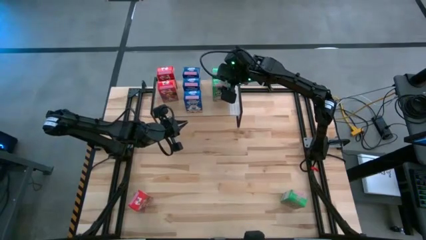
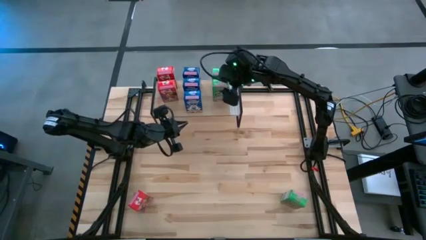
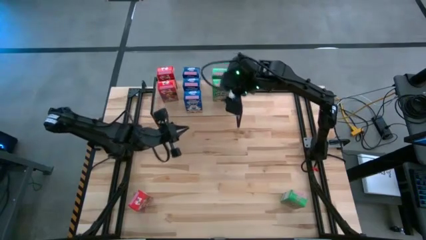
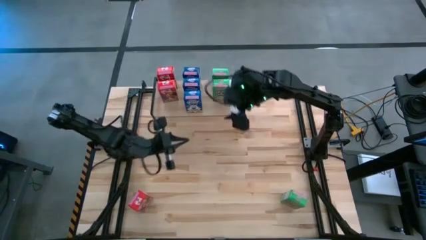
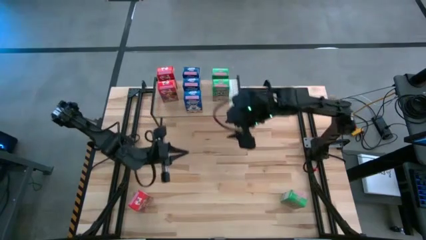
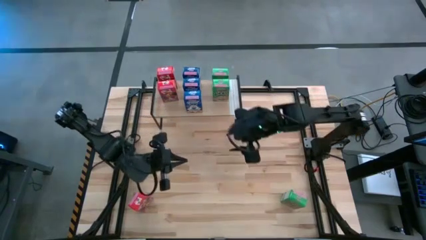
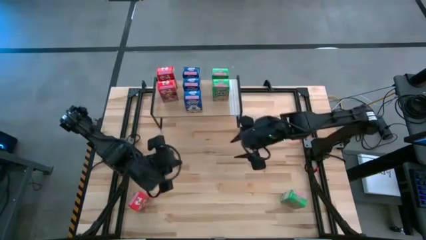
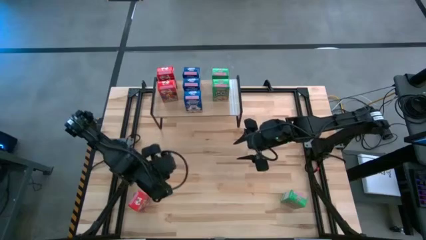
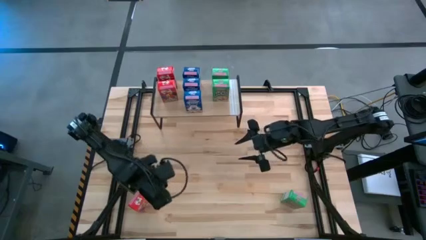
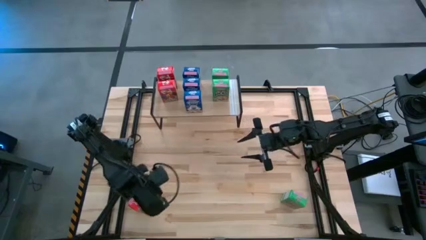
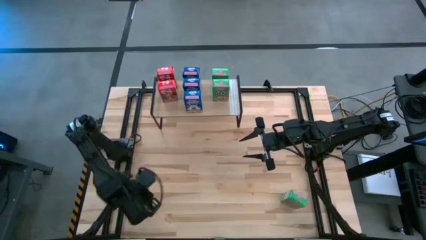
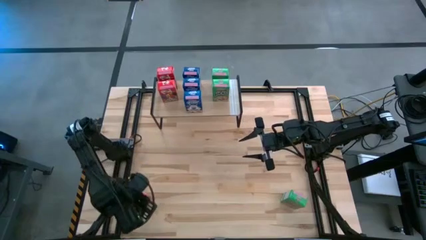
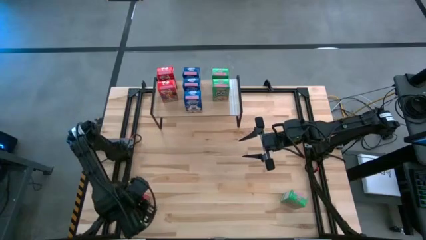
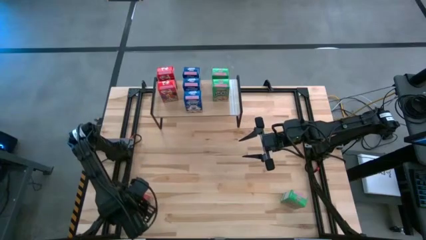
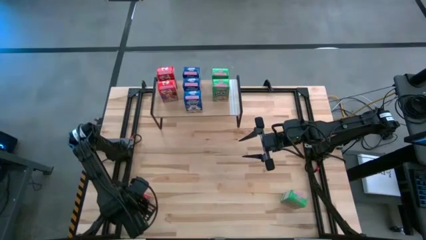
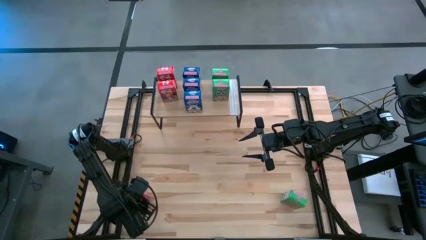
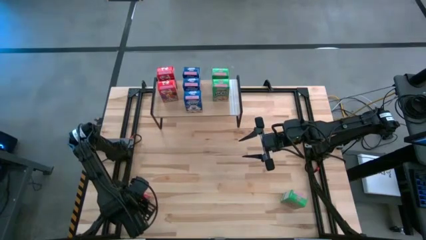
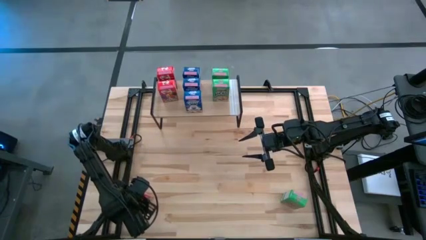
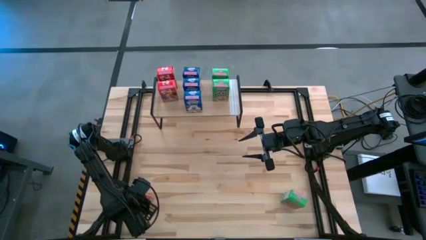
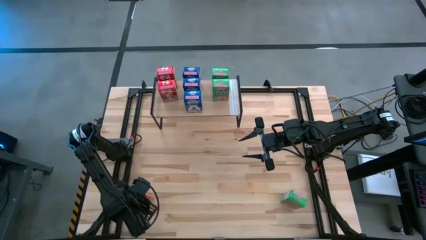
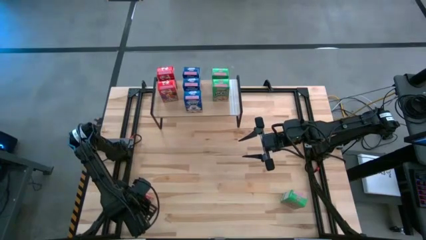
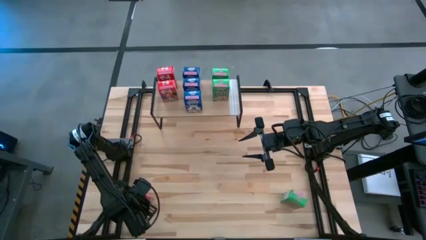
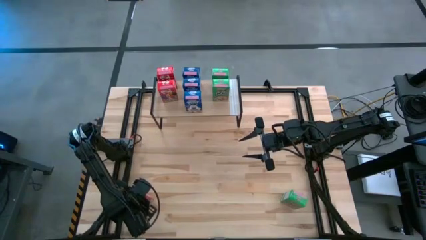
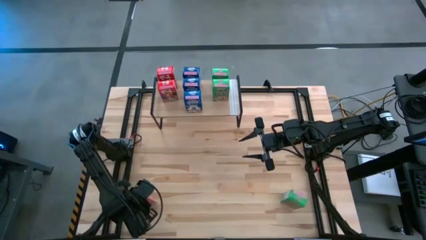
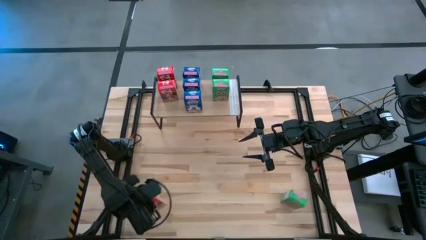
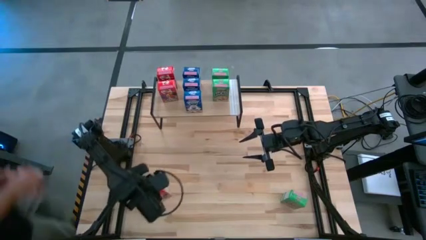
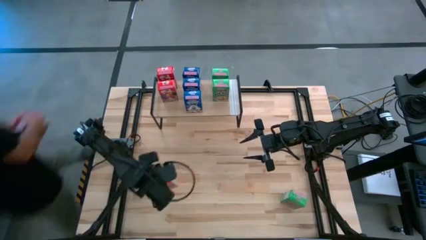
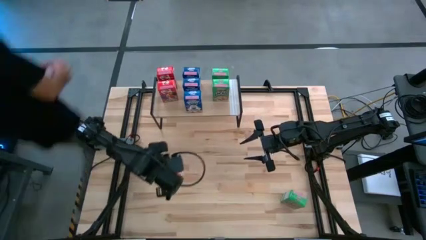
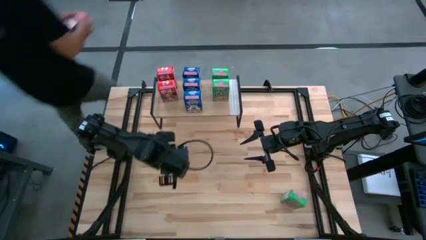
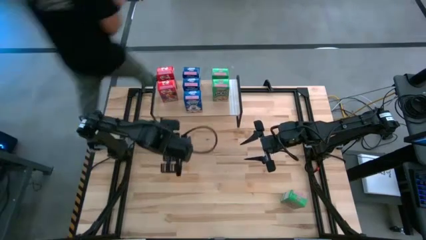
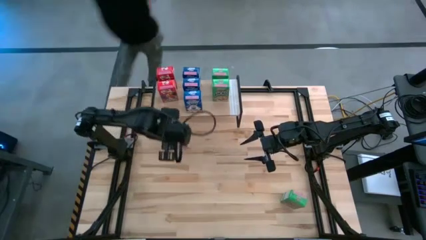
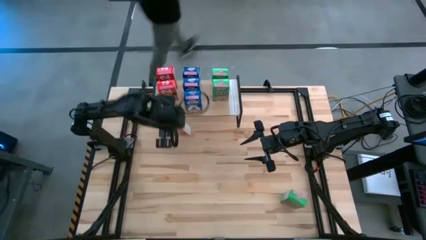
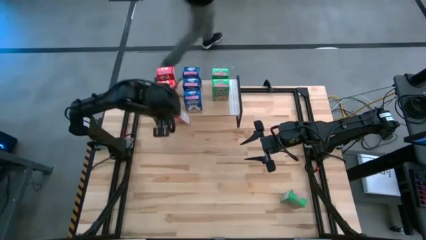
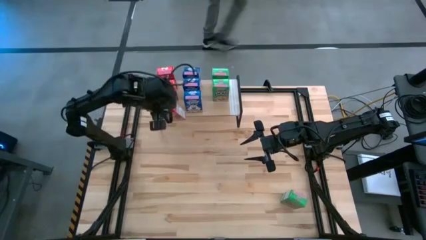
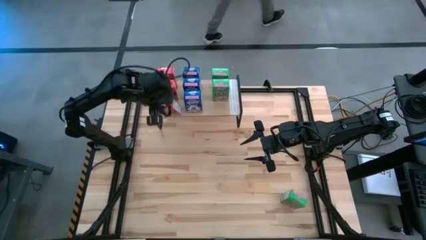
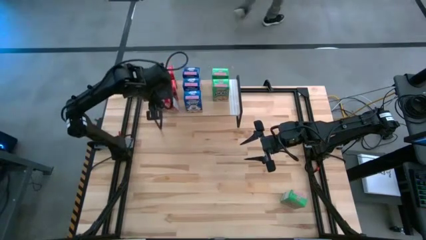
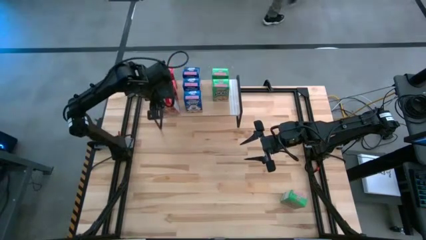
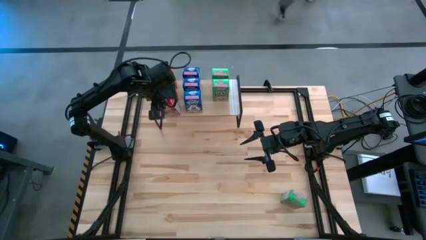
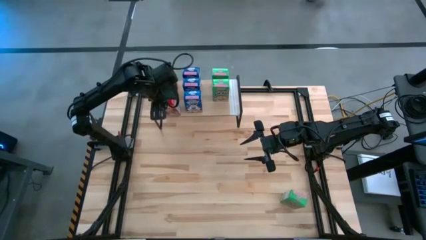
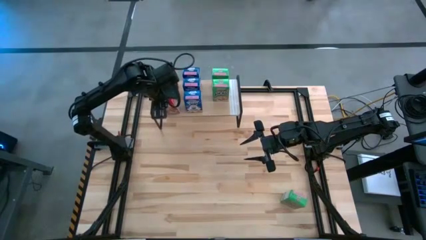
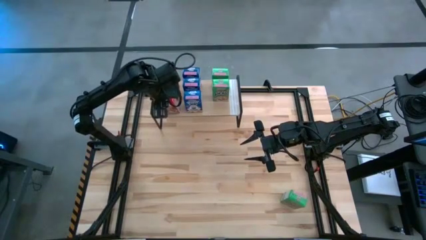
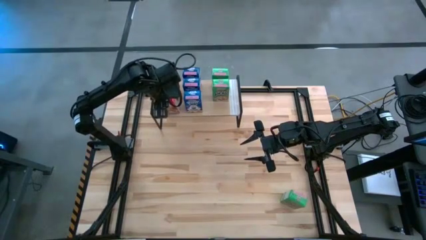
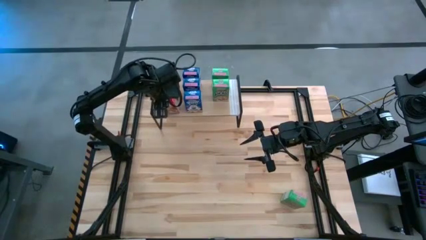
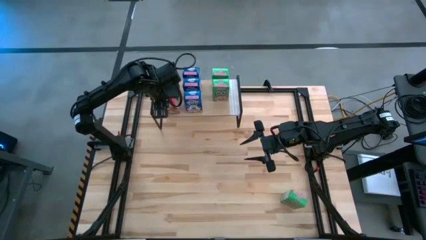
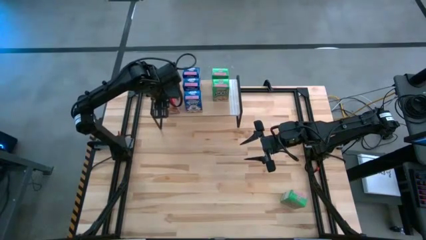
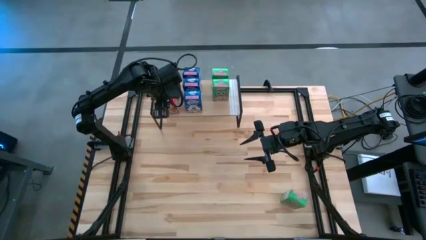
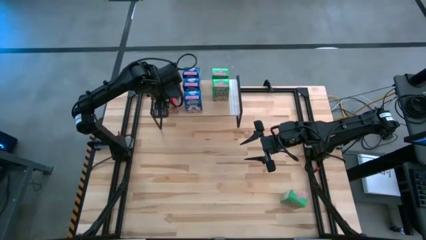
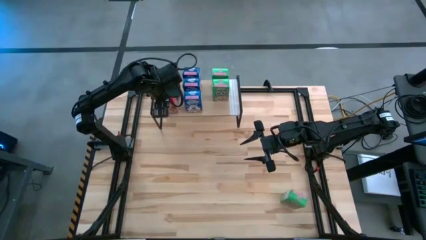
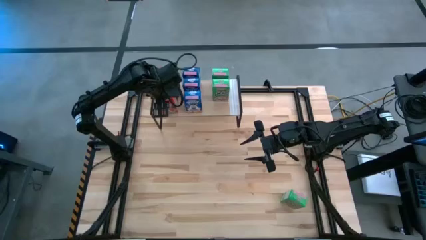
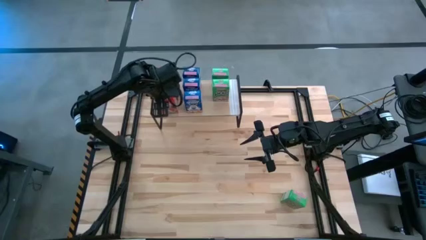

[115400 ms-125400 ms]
Task: Stack cereal on shelf
Put the red cereal box on the shelf aligned with the red cereal boxes

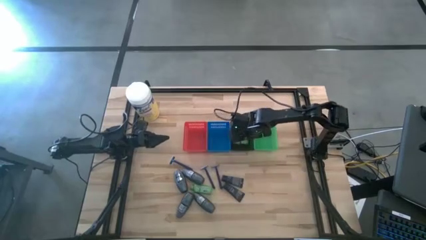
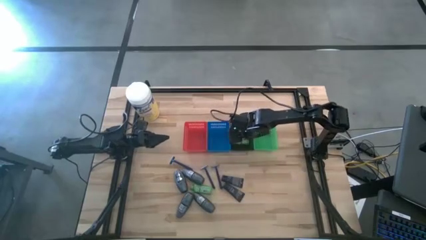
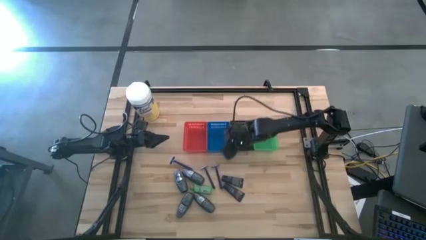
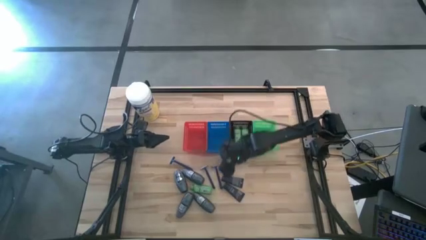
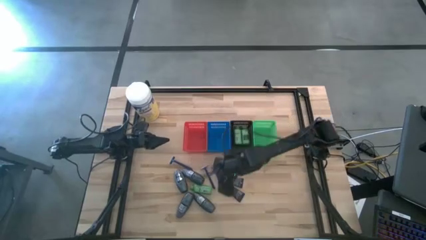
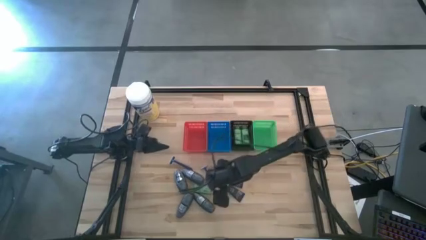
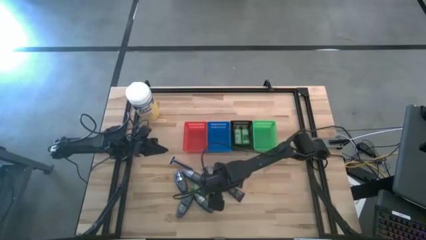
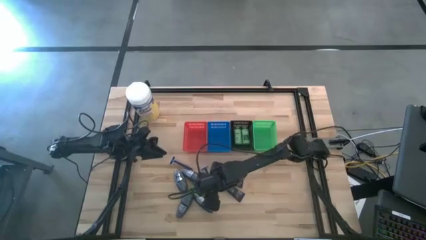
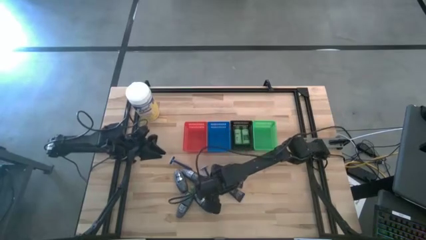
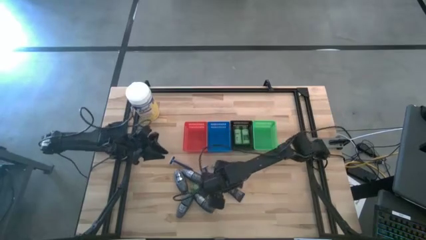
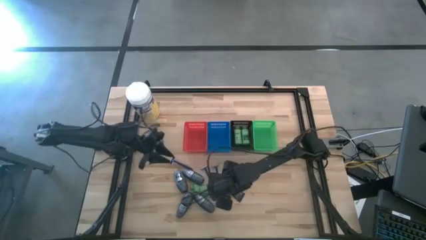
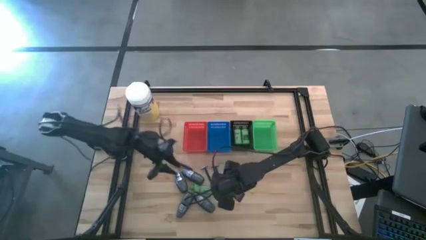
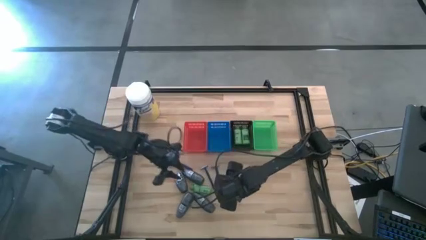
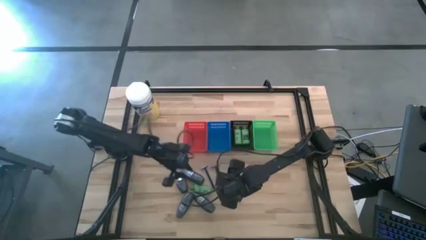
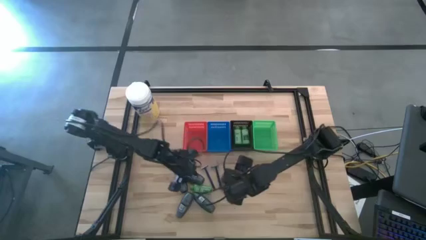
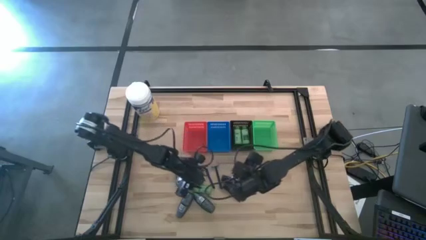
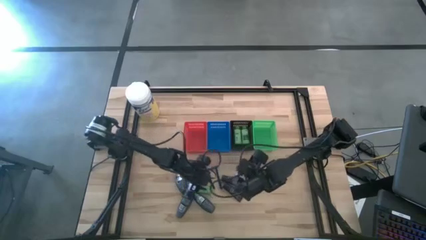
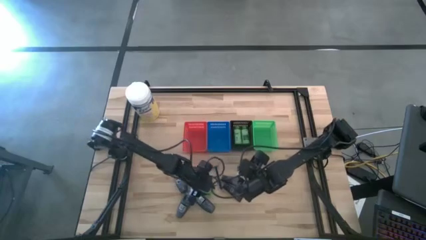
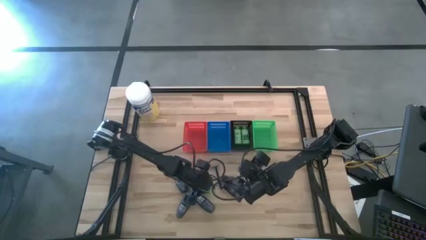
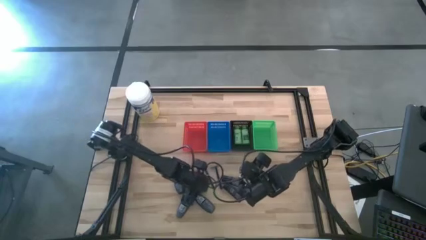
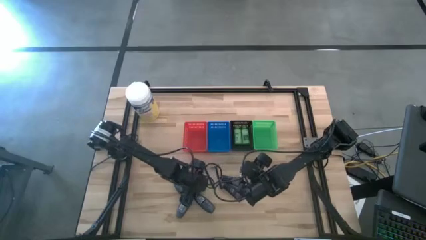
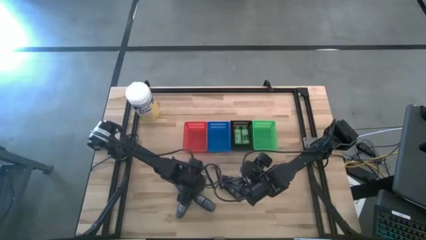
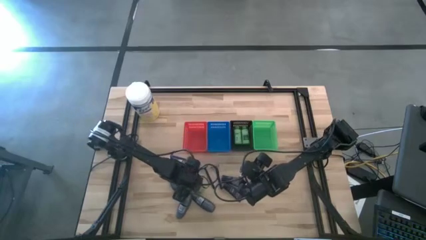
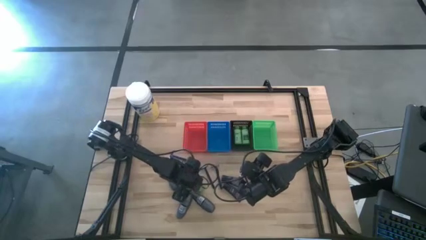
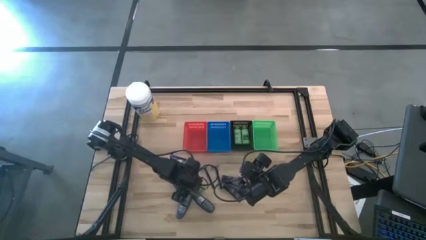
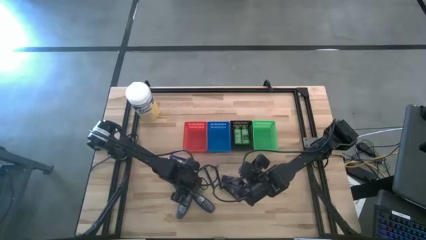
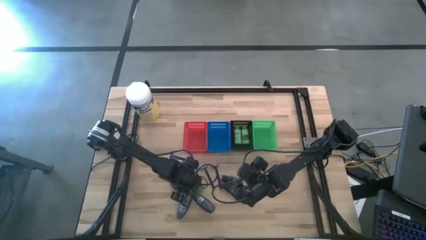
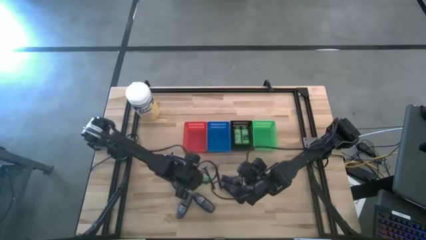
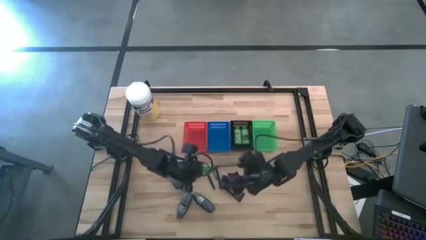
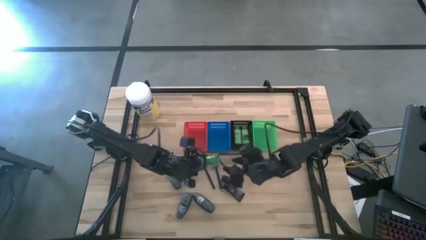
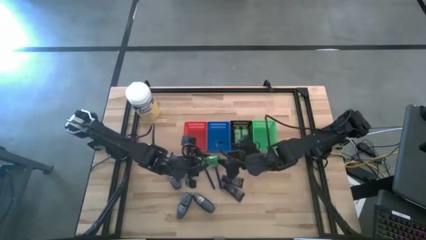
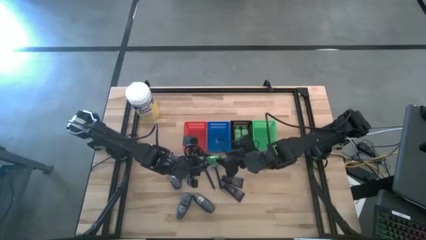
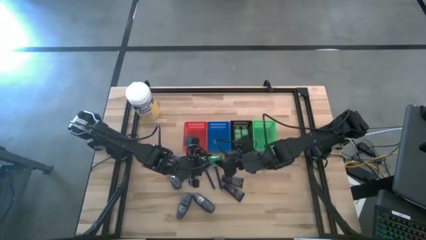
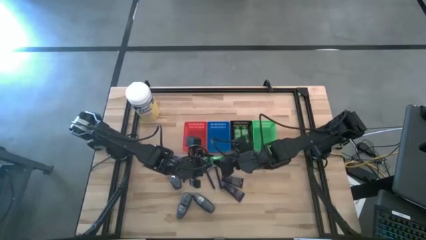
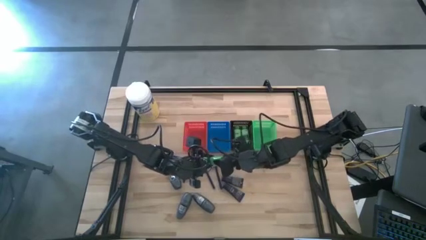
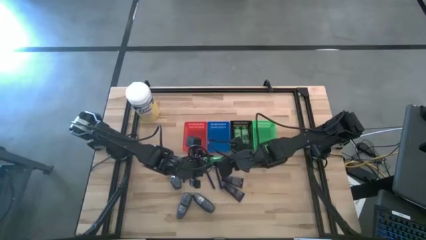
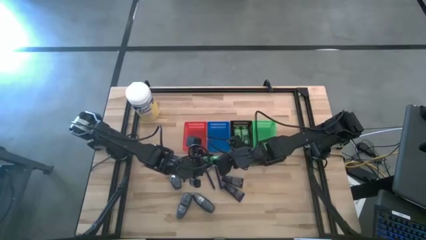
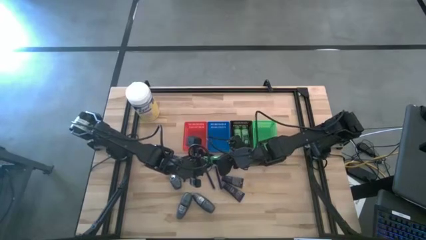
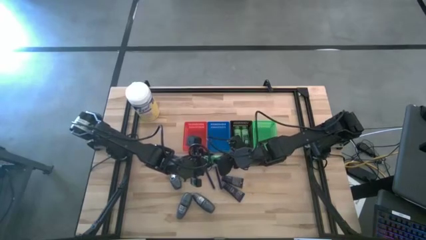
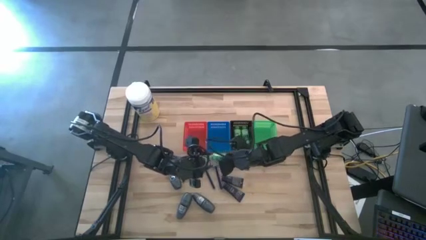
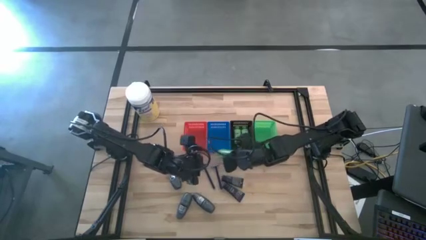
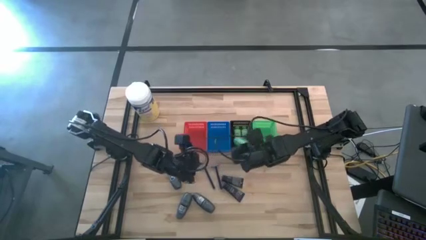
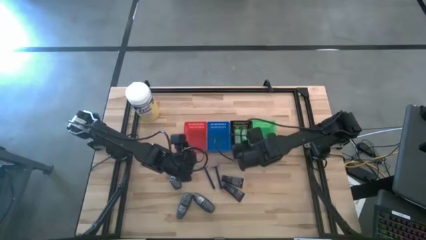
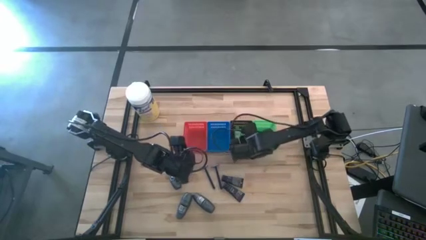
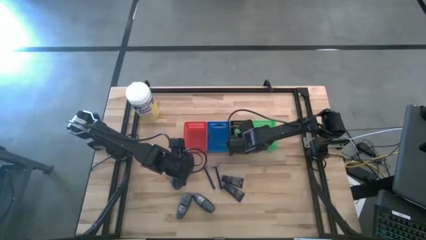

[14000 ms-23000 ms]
Task: Pick & Place Travel size toiletries
Put the shampoo into the black basket
